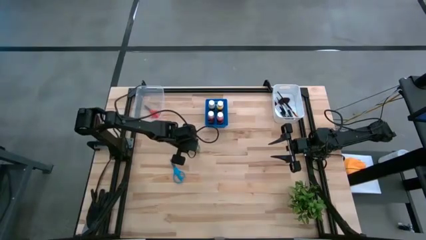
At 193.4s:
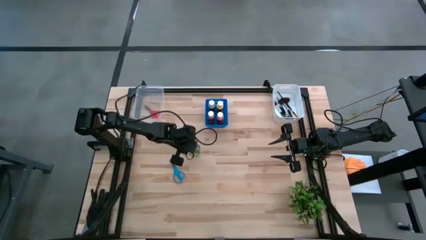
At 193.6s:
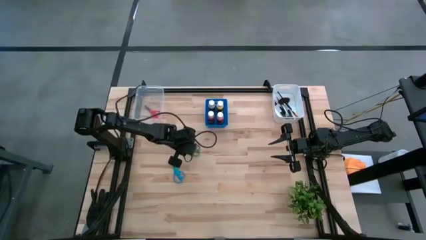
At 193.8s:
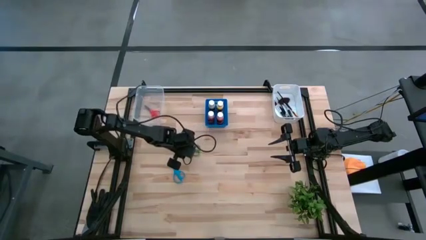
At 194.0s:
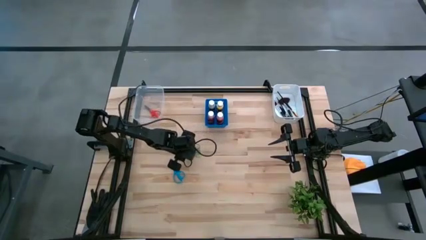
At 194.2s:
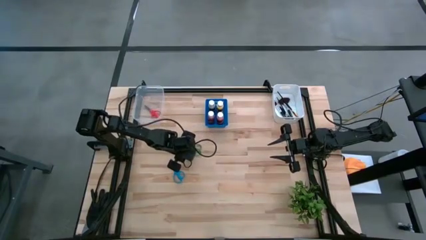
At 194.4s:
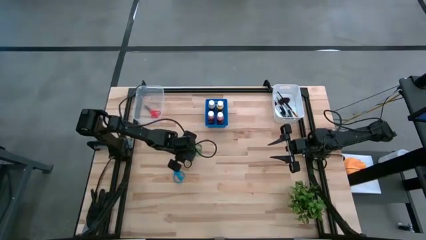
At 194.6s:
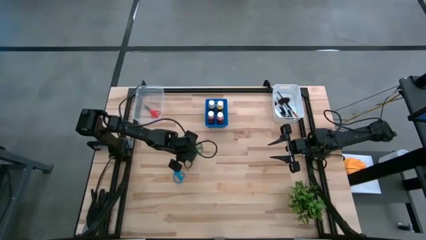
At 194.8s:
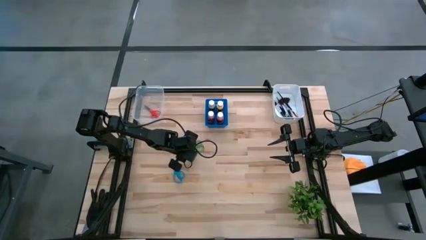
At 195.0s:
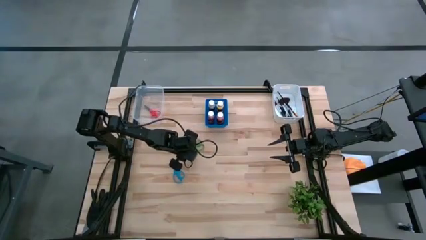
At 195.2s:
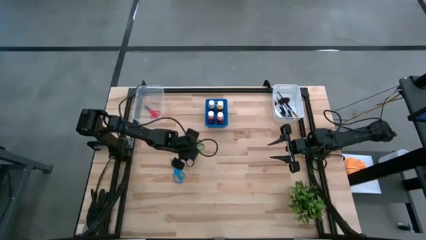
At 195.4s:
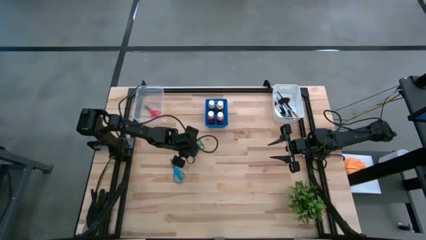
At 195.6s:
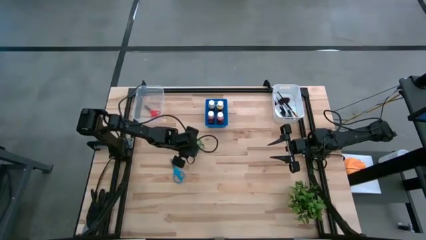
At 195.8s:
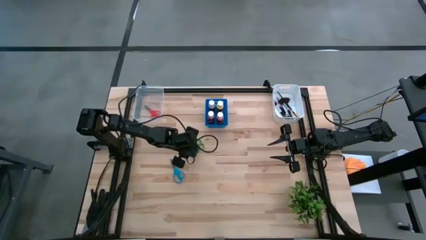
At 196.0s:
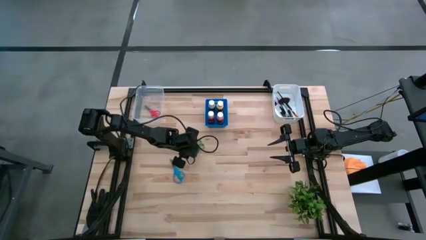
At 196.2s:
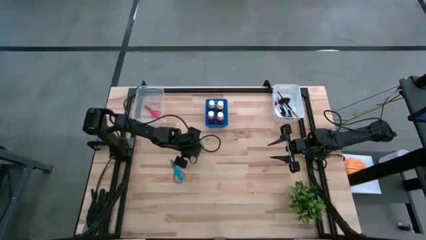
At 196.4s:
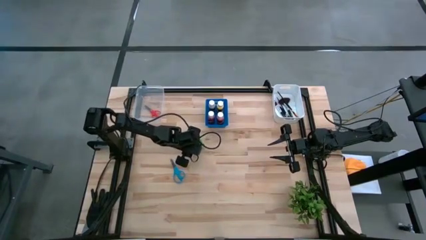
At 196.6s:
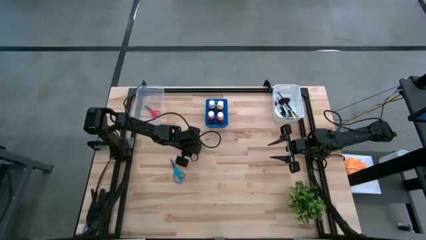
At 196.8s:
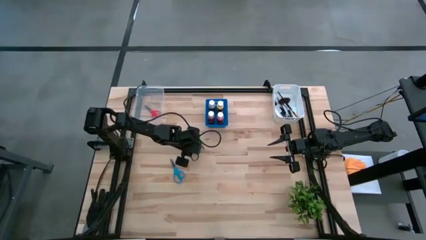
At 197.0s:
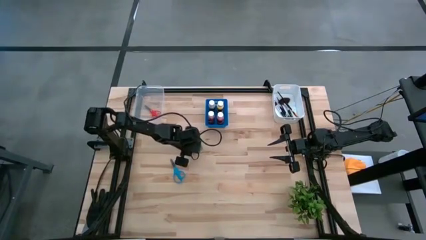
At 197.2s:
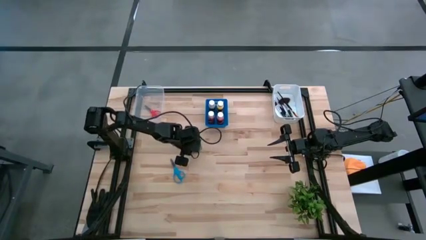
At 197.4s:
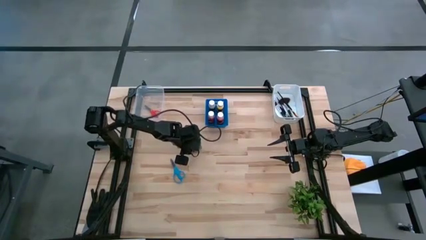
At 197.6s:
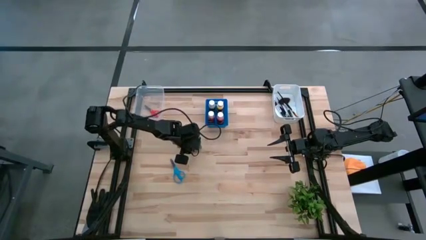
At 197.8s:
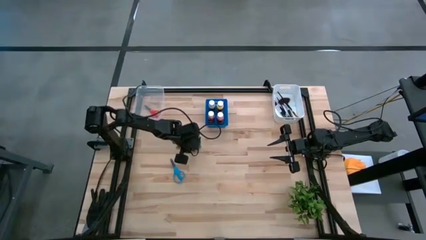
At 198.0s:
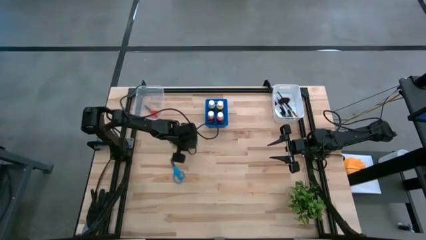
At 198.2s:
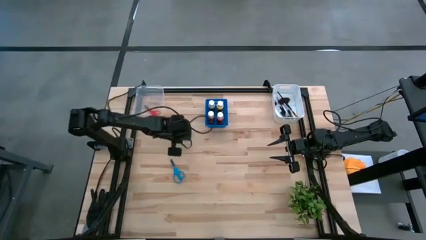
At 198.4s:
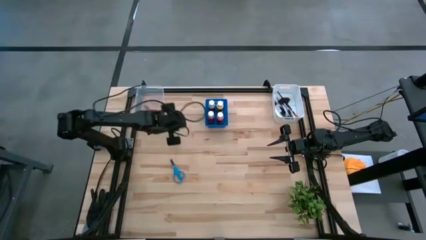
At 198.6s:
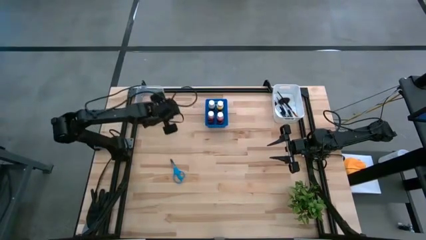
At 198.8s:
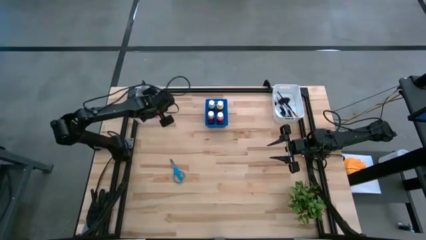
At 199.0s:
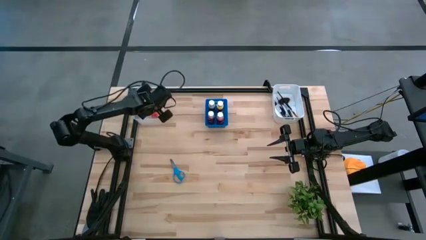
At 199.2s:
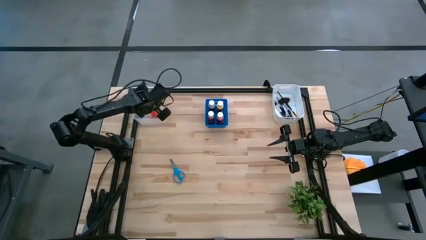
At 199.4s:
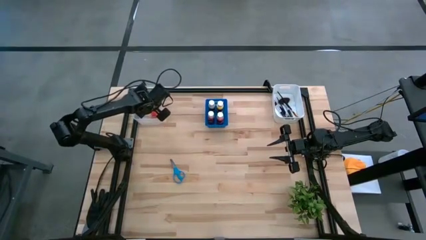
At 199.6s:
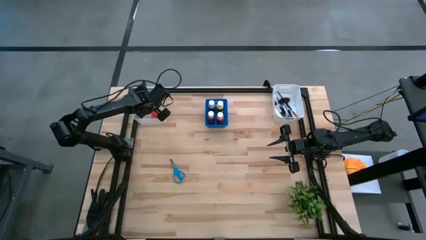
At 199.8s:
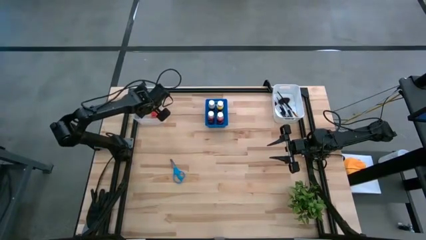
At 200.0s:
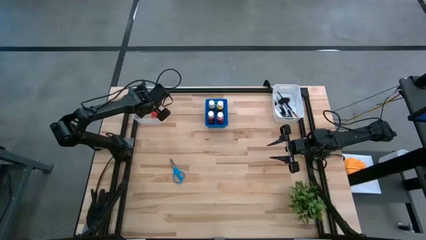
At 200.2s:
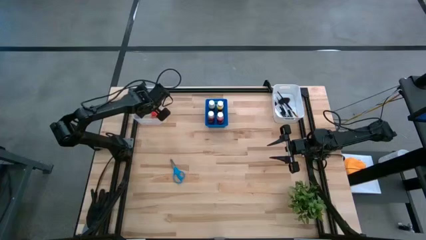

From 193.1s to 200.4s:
Task: Pick & Place Paint Supplies
Put the green scissors into the transparent bin

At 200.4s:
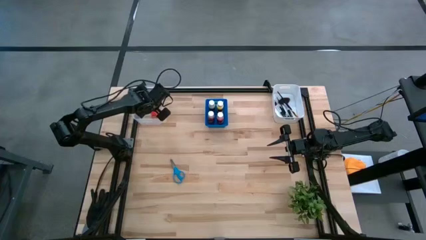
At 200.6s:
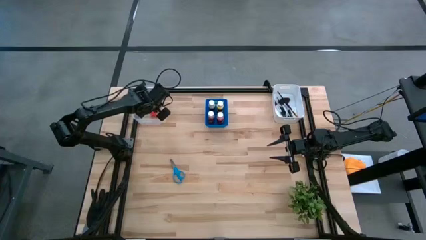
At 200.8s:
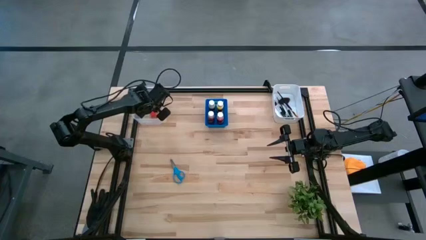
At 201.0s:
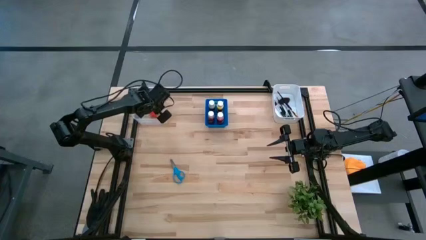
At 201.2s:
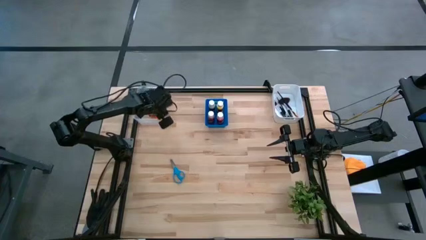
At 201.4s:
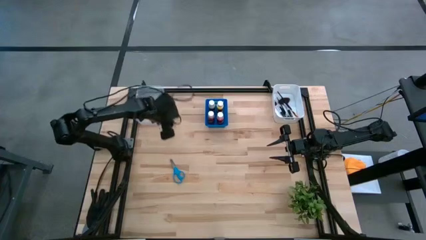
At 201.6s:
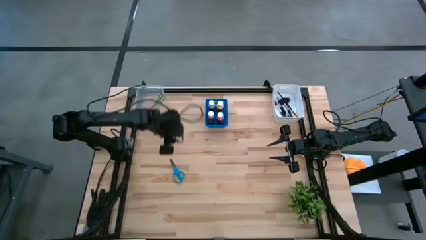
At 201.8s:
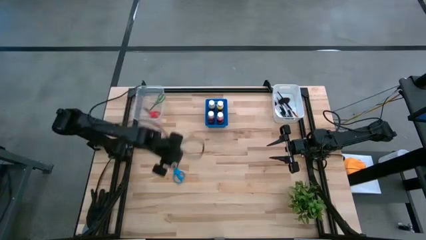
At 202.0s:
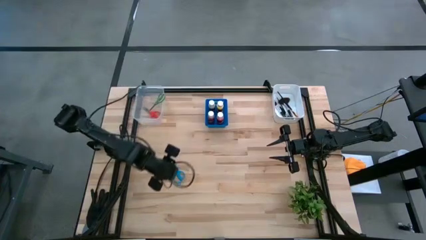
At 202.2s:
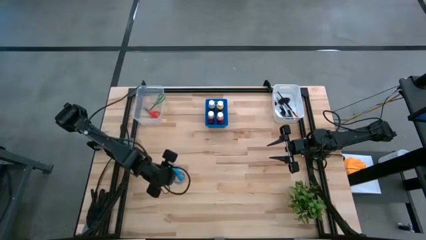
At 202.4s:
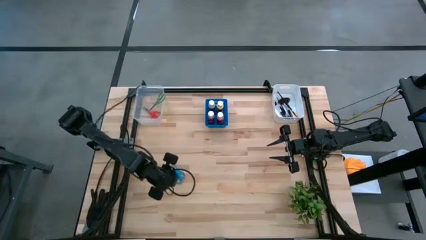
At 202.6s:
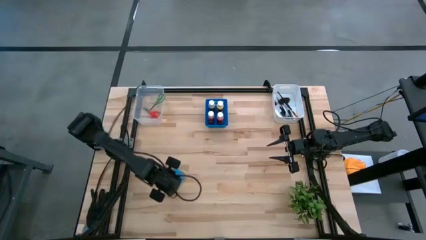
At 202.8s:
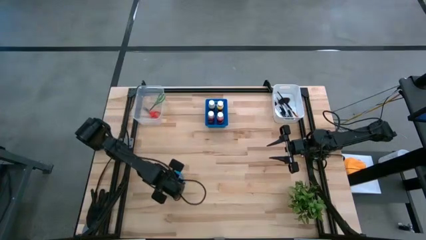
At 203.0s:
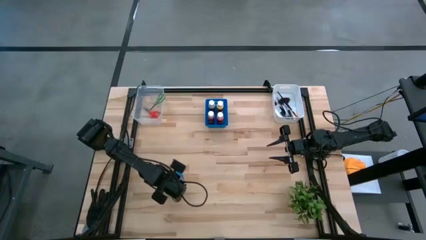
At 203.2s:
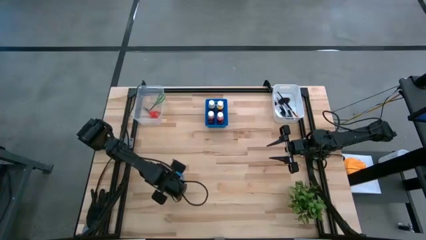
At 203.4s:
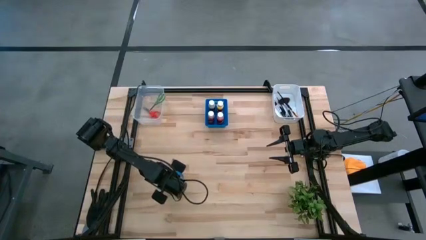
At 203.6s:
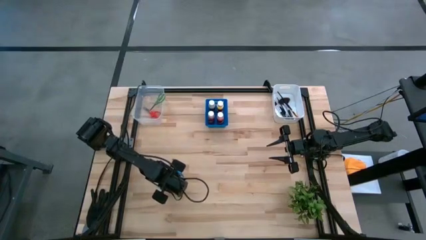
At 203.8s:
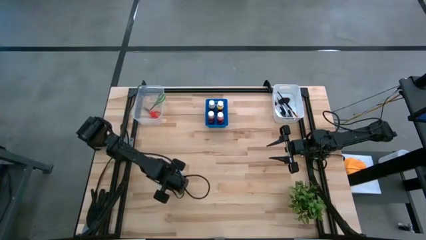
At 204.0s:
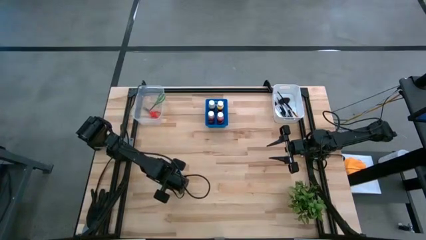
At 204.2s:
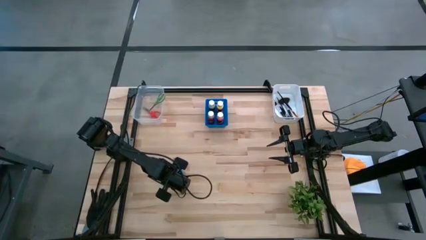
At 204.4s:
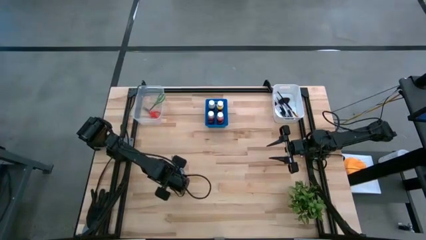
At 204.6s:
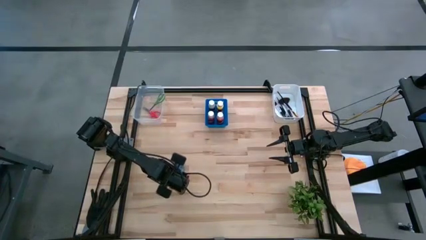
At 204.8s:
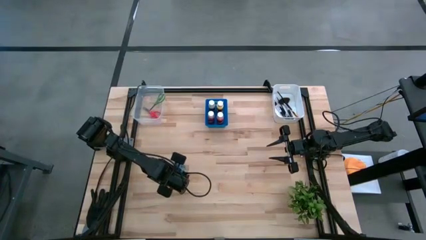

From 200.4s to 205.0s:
Put the blue scissors into the transparent bin
